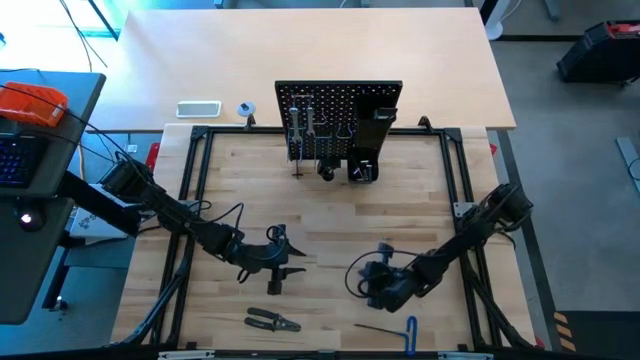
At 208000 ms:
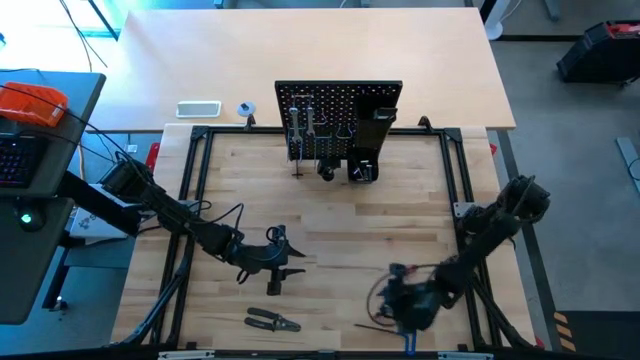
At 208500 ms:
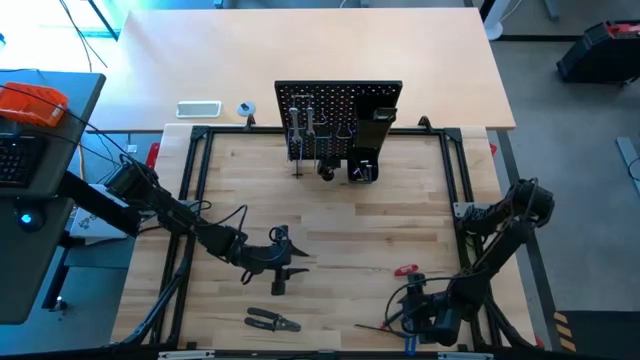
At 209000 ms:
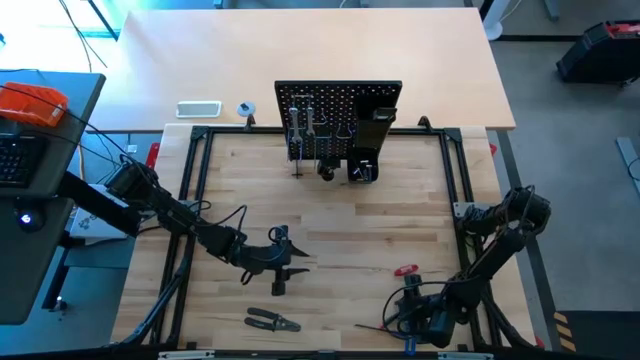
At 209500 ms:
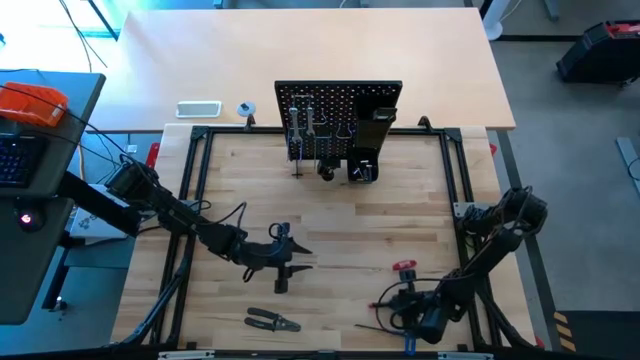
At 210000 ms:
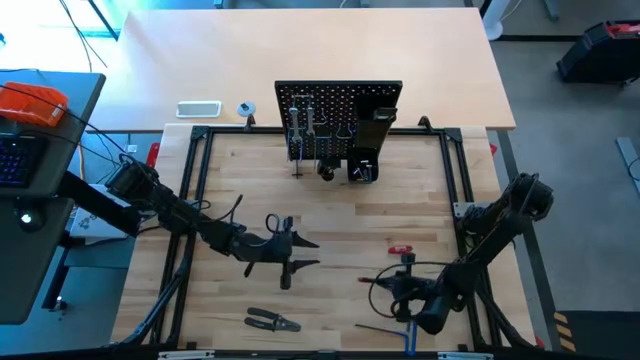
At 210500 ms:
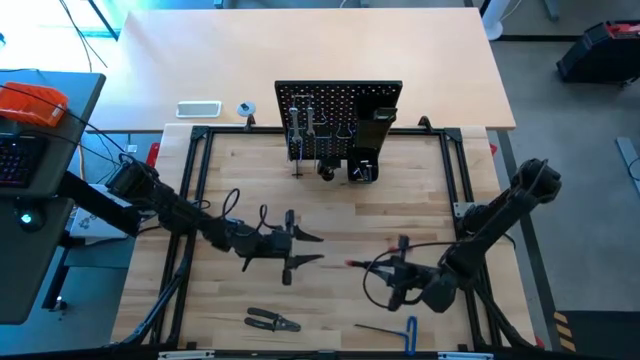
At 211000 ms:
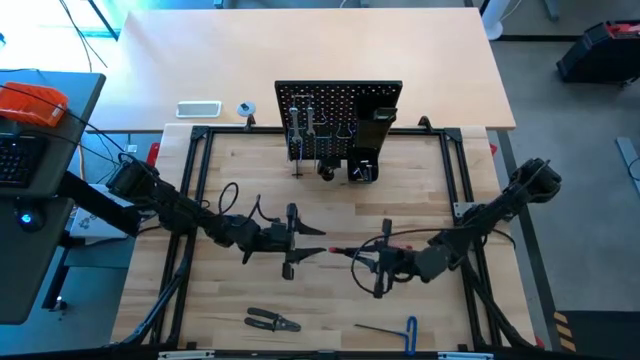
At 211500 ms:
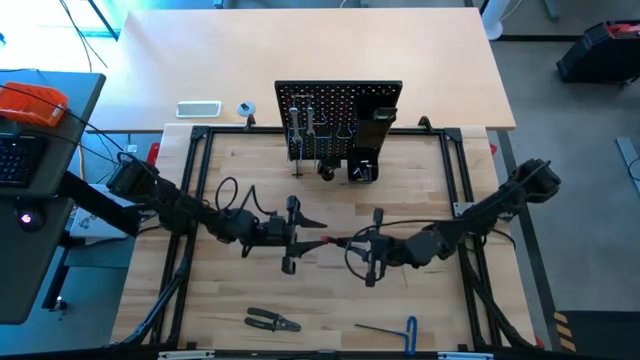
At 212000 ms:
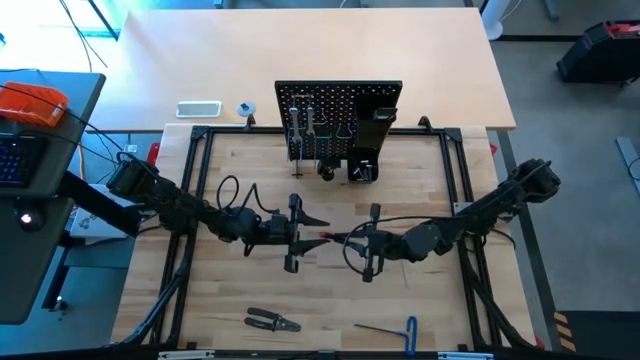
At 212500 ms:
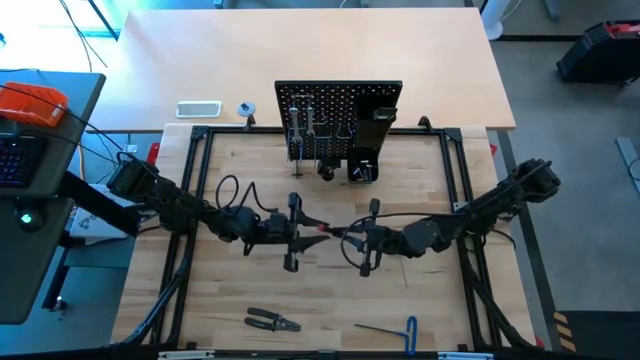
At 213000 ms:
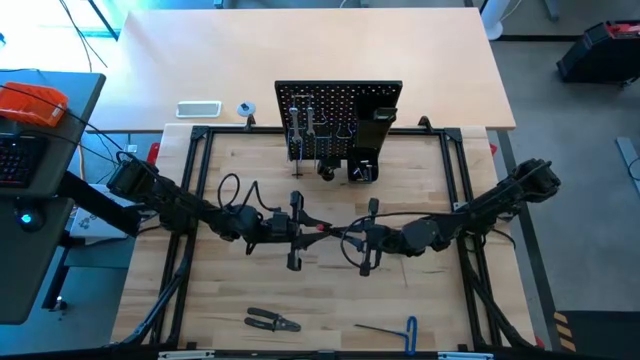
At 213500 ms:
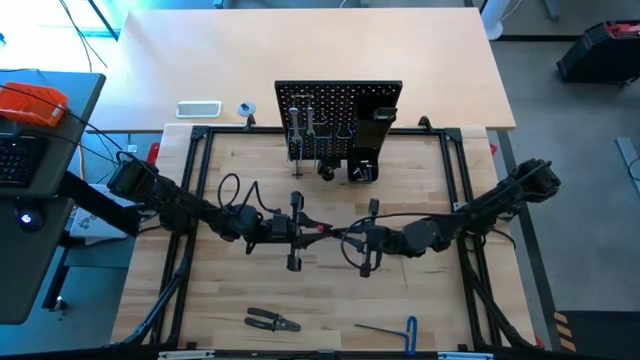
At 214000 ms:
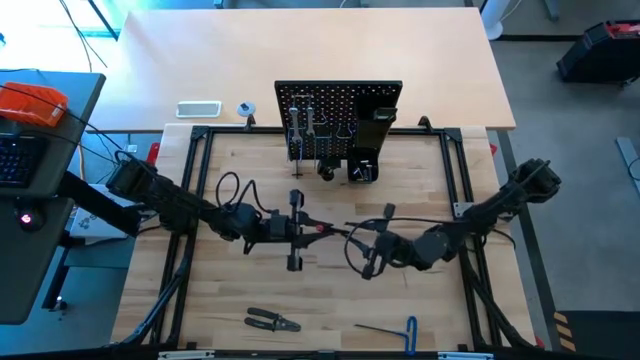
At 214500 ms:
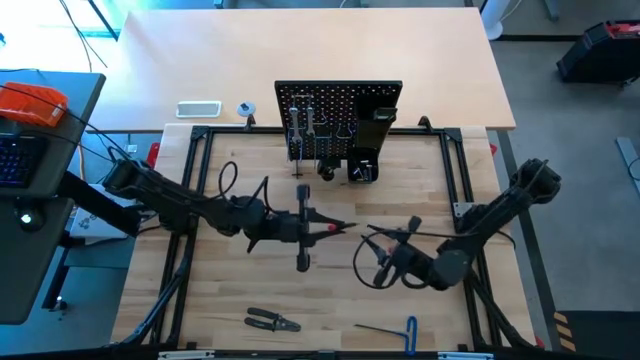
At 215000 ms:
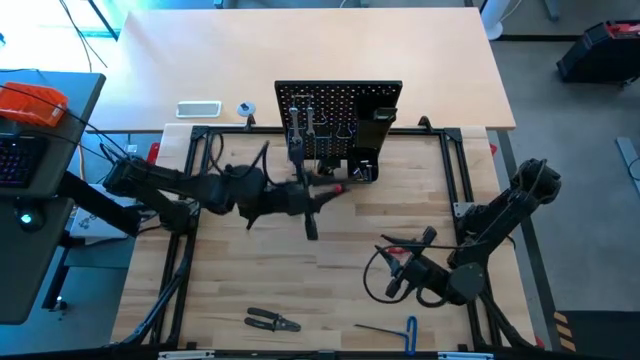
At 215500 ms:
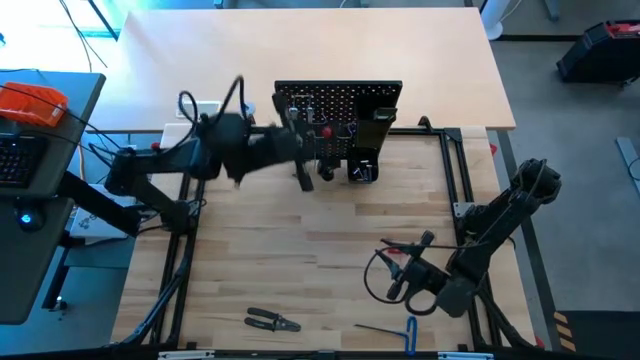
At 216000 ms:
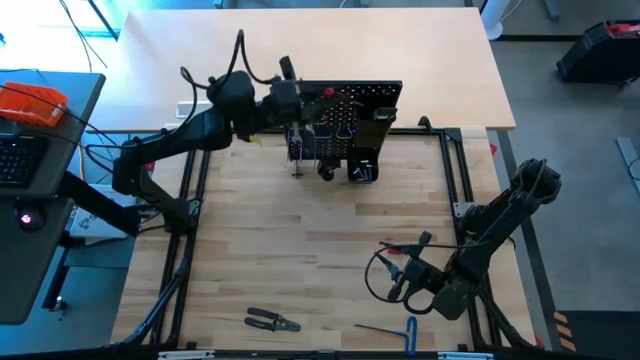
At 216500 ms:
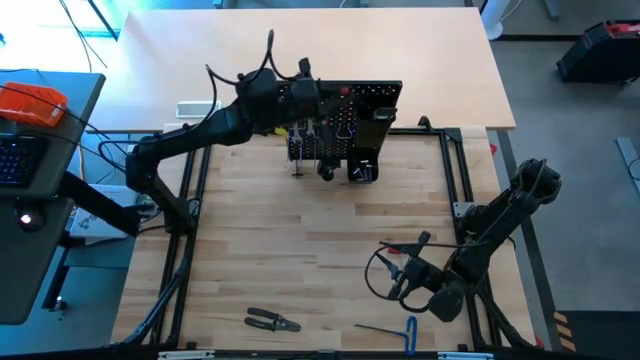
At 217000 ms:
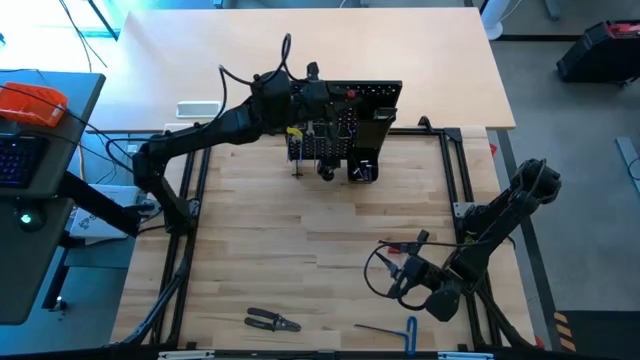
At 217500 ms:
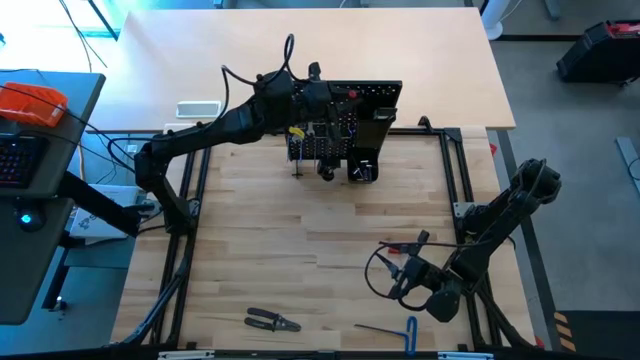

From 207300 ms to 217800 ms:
Task: Hang tools onto peg board
Put the black nut into the top peg board bin

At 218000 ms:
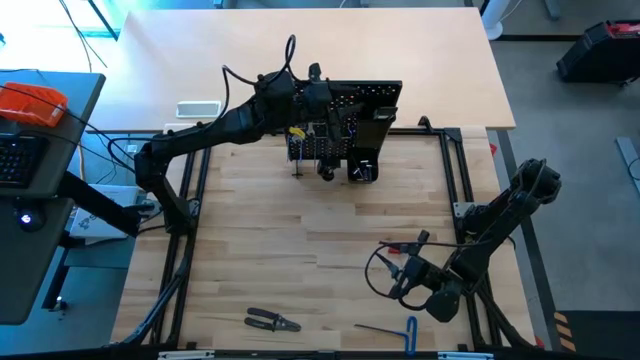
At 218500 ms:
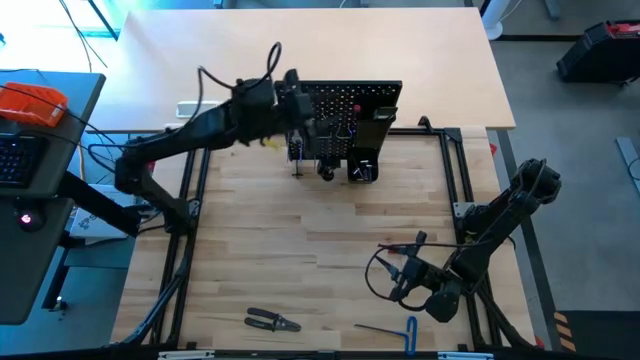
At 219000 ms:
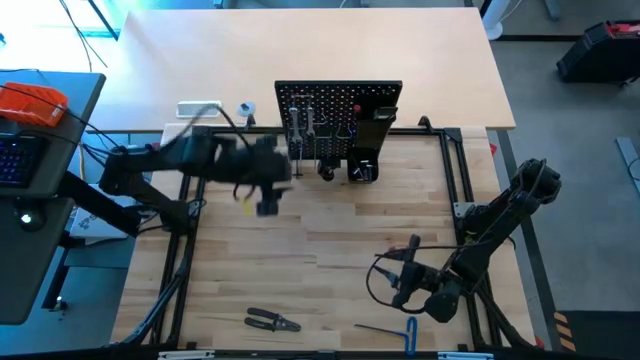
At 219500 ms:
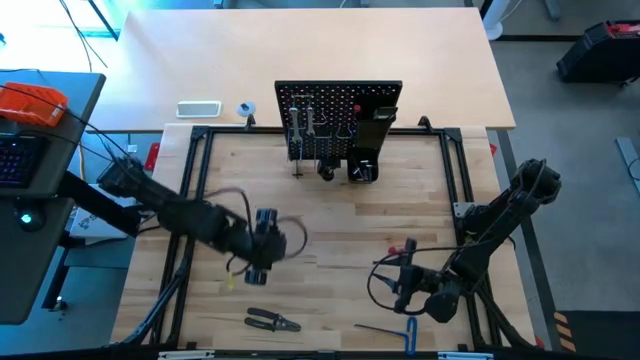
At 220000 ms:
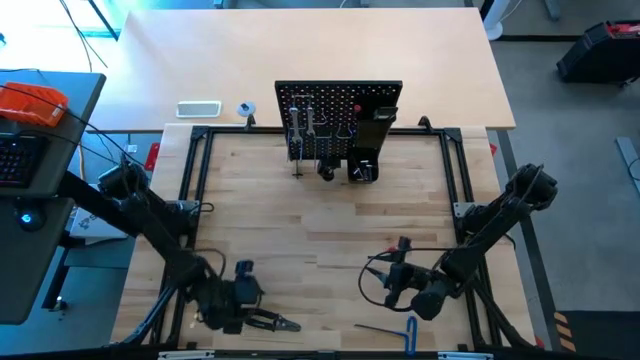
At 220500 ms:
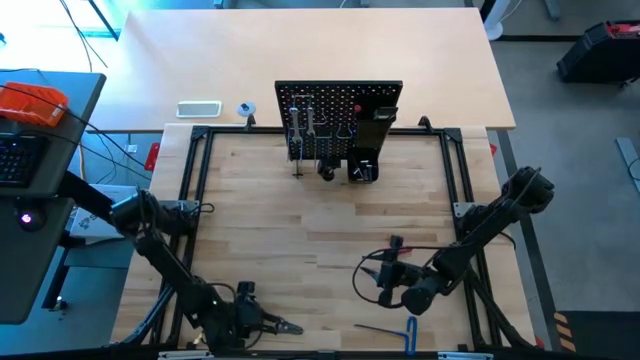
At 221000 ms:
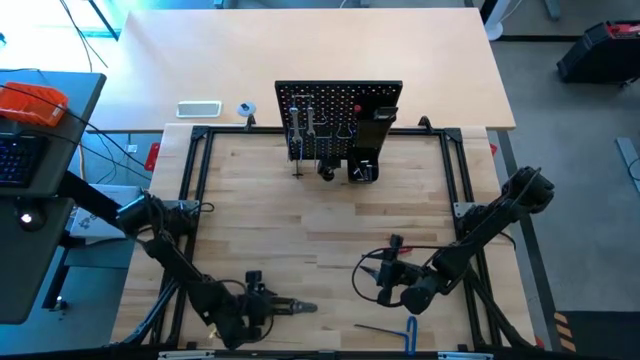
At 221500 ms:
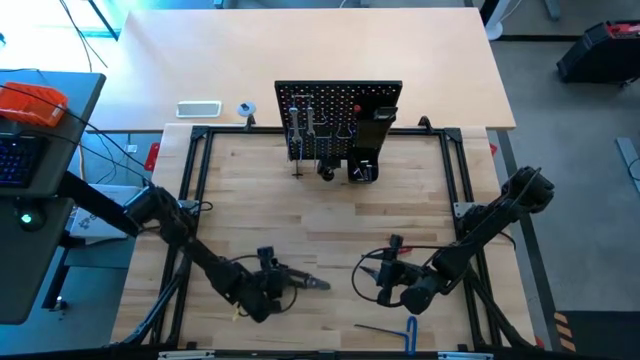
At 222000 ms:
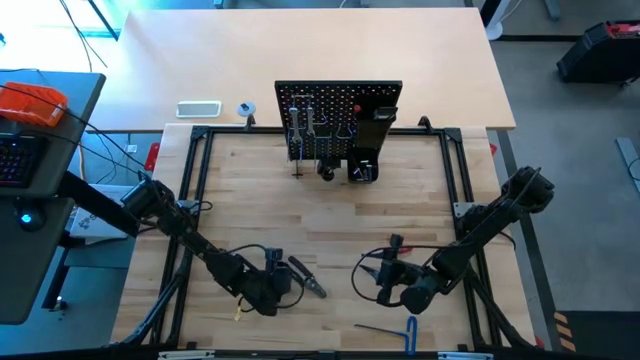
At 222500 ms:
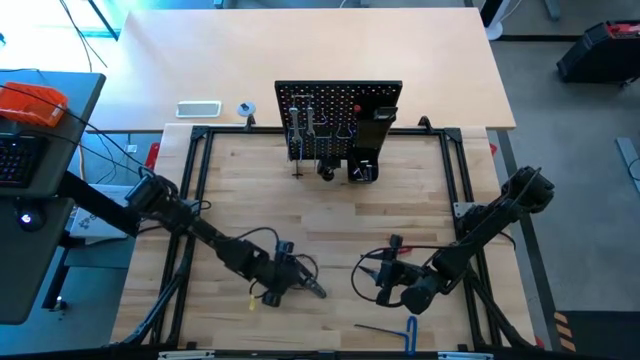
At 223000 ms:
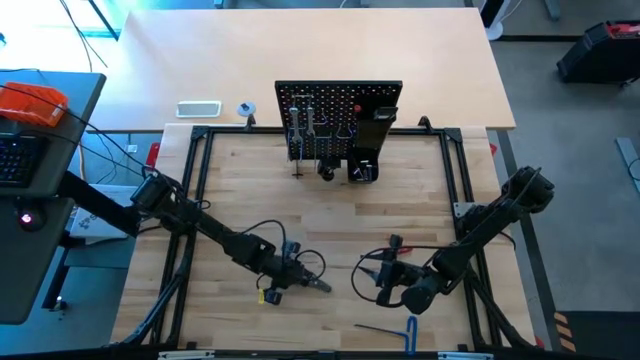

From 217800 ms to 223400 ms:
Hang the black wire cutter onto the peg board

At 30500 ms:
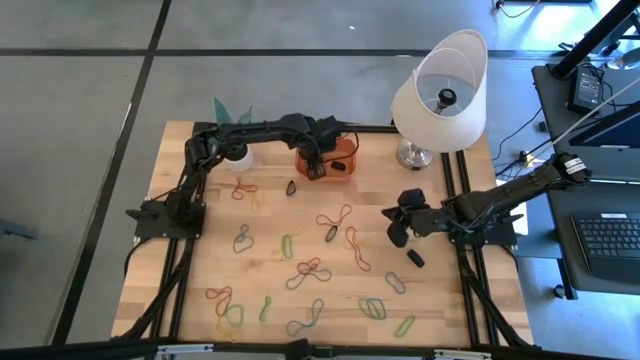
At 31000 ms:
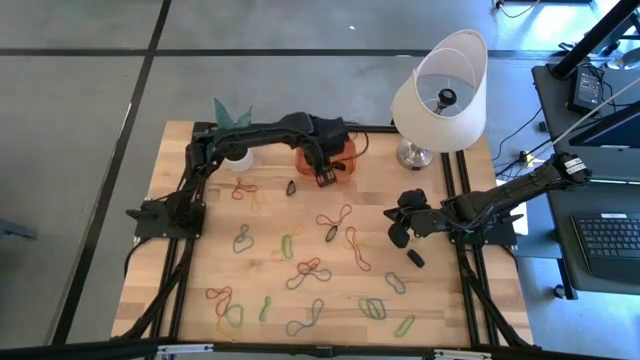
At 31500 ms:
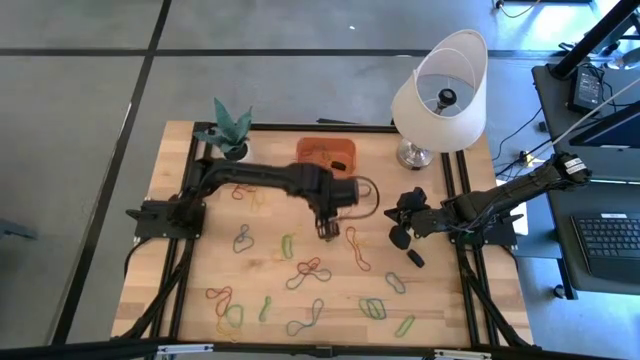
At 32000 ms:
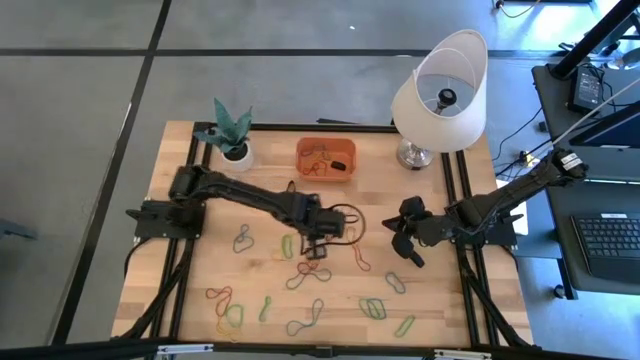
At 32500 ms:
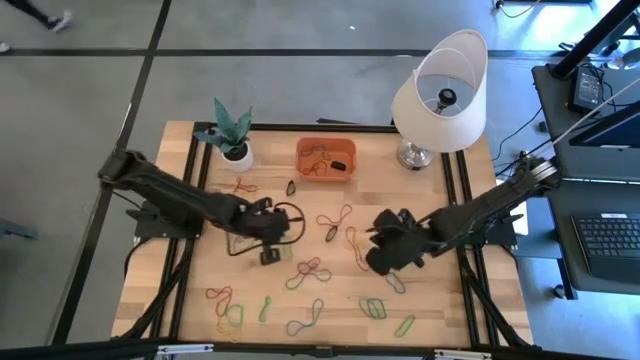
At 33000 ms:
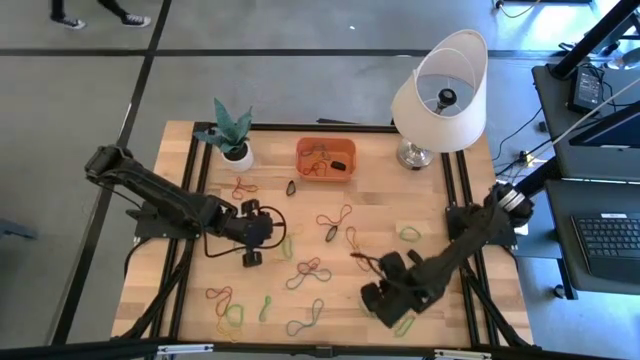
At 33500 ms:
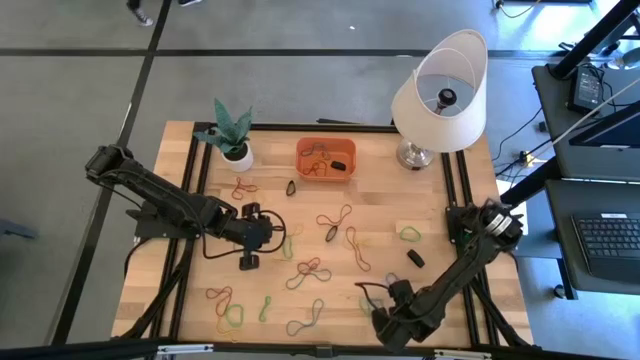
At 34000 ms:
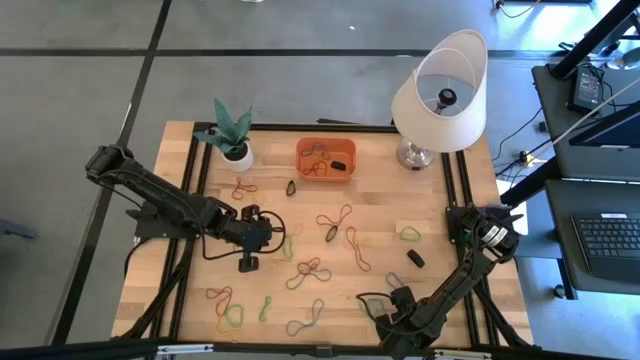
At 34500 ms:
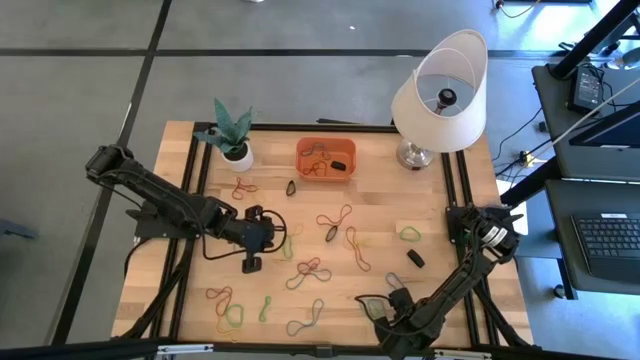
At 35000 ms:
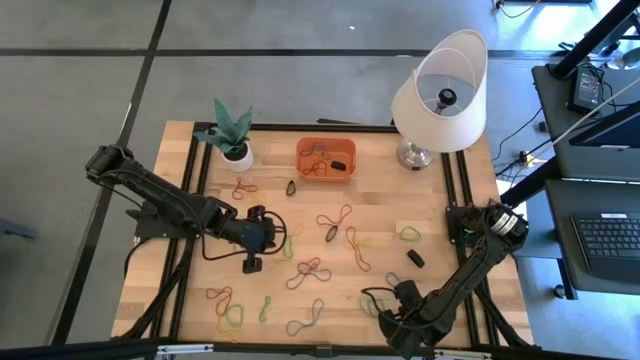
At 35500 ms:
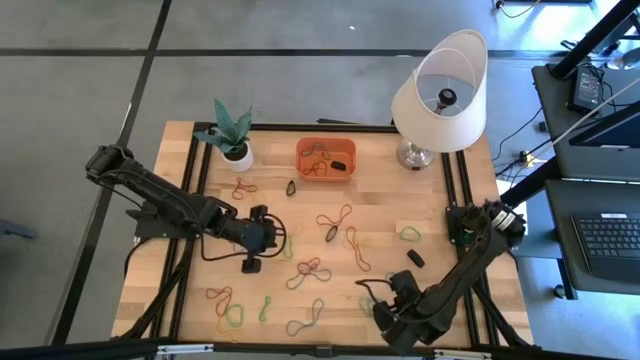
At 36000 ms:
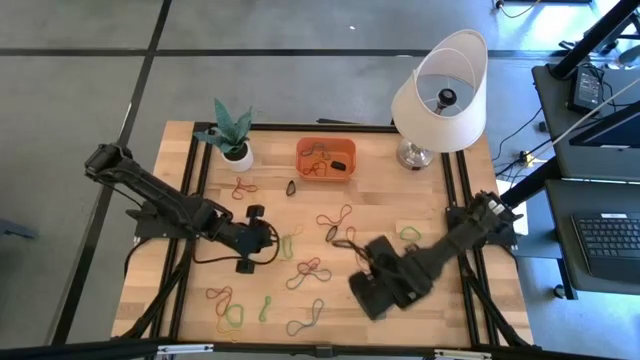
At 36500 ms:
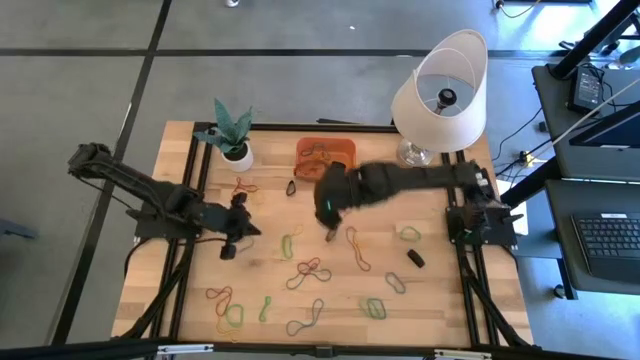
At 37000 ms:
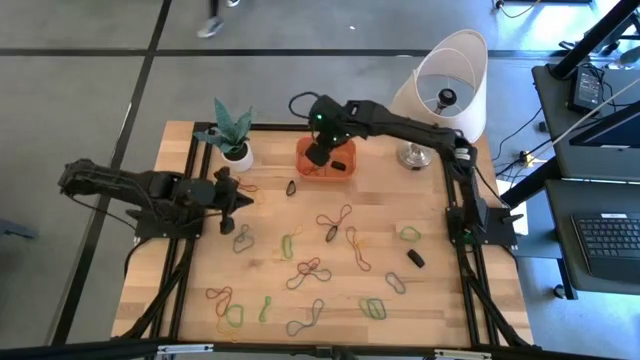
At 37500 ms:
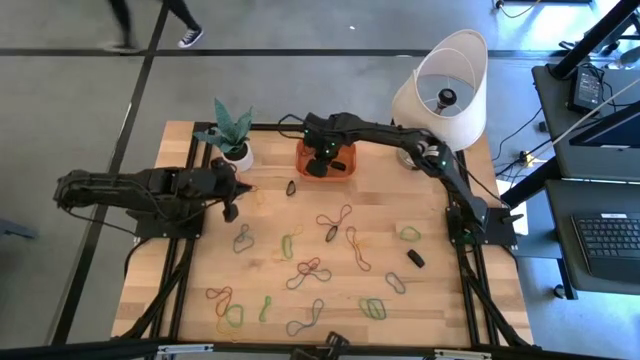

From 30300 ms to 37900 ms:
Task: Pick and place rubber bands into bin
Put the green rubber band into the orange bin
